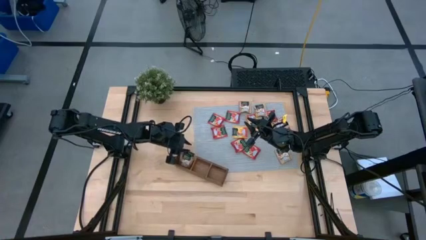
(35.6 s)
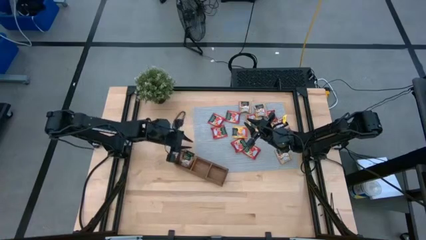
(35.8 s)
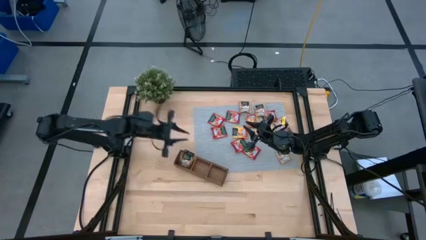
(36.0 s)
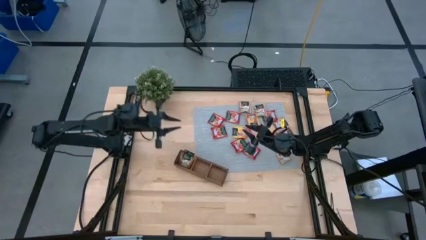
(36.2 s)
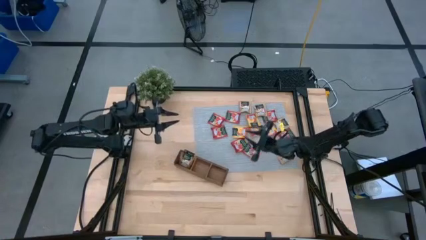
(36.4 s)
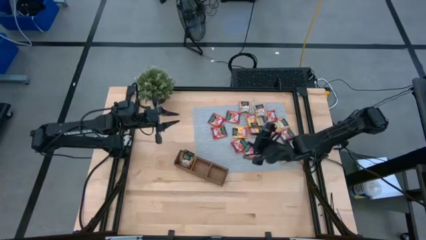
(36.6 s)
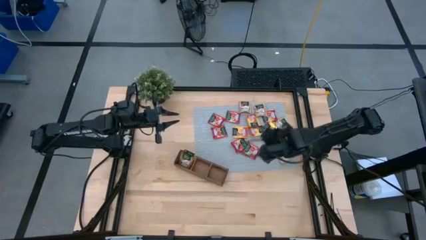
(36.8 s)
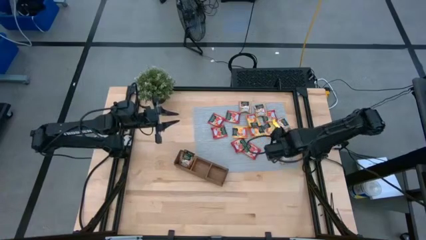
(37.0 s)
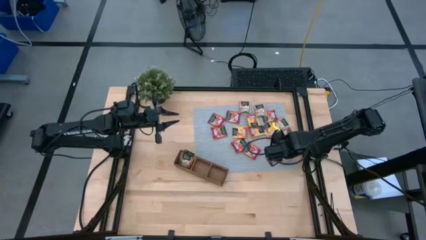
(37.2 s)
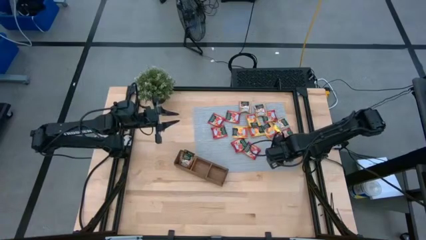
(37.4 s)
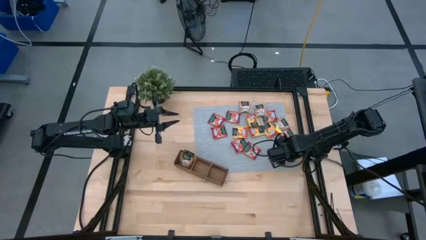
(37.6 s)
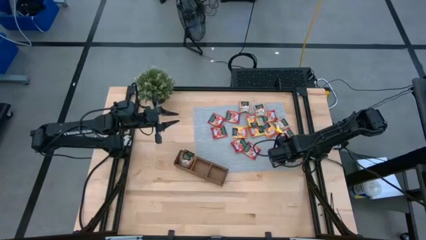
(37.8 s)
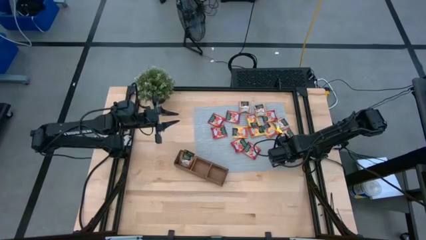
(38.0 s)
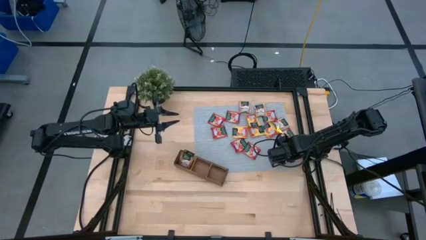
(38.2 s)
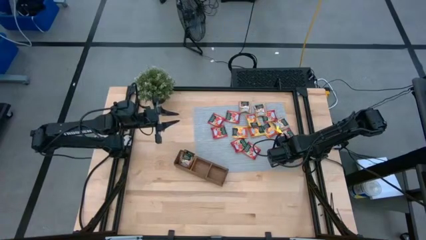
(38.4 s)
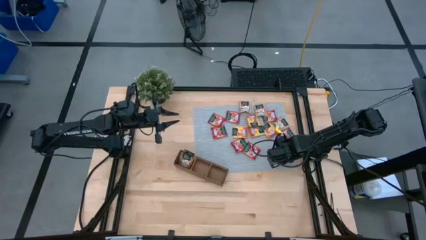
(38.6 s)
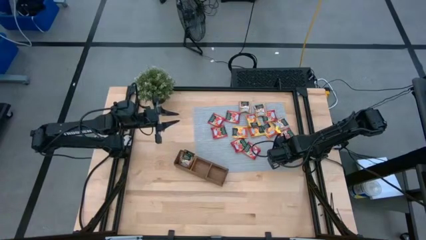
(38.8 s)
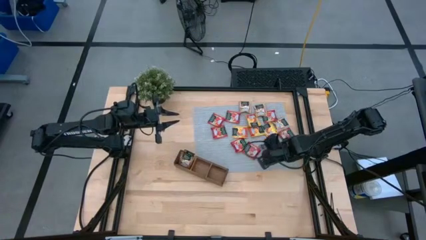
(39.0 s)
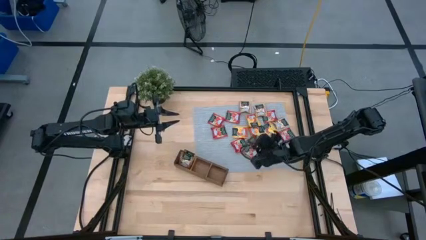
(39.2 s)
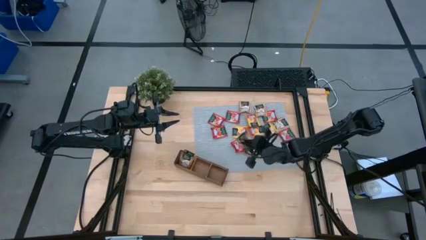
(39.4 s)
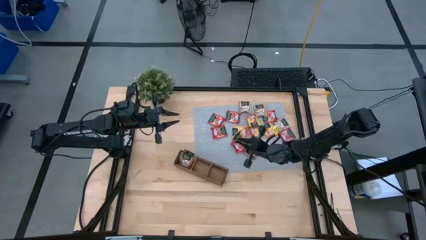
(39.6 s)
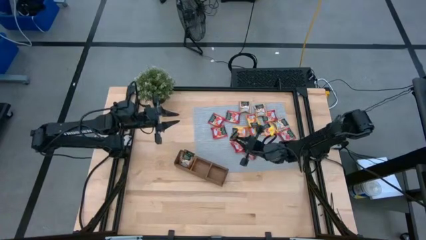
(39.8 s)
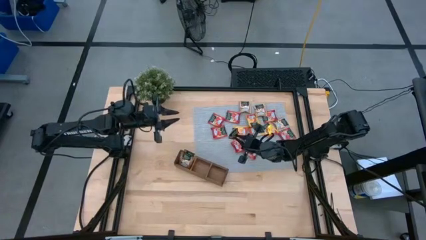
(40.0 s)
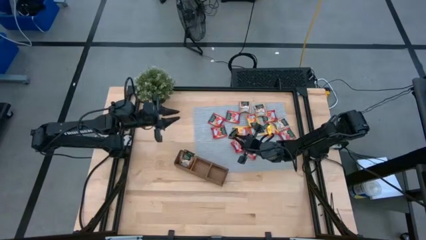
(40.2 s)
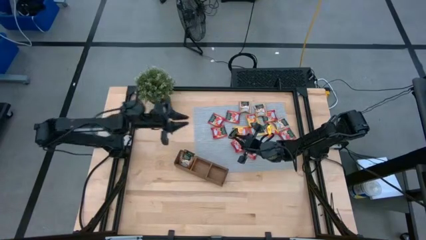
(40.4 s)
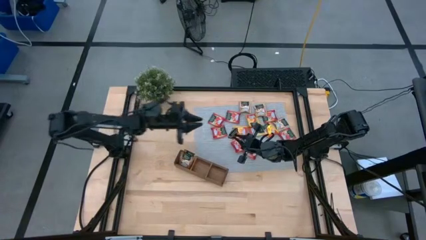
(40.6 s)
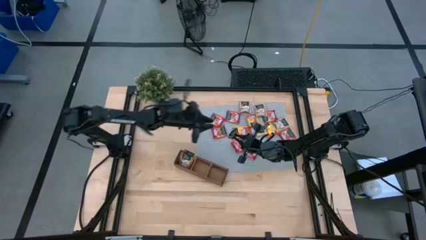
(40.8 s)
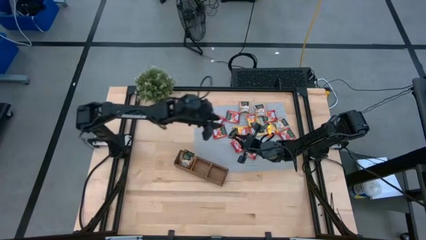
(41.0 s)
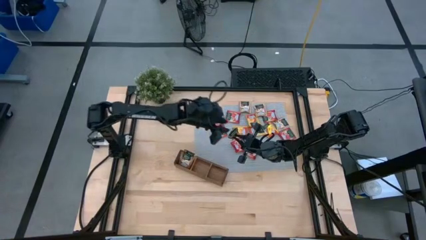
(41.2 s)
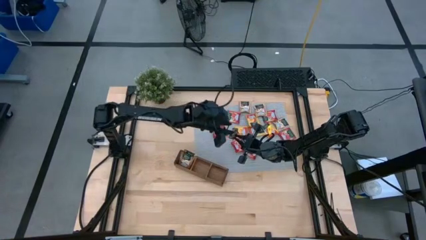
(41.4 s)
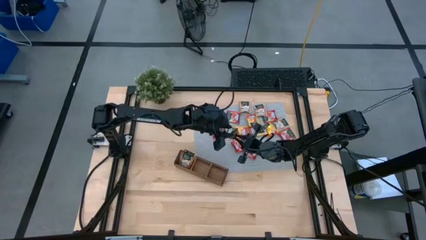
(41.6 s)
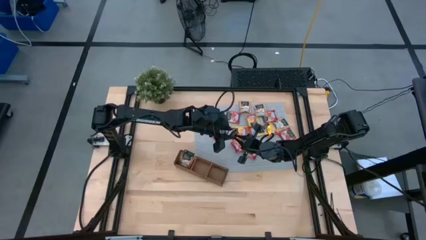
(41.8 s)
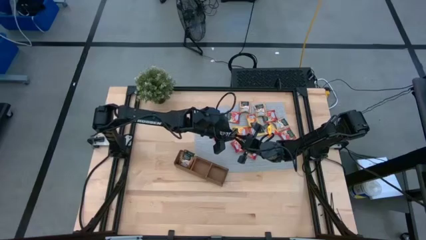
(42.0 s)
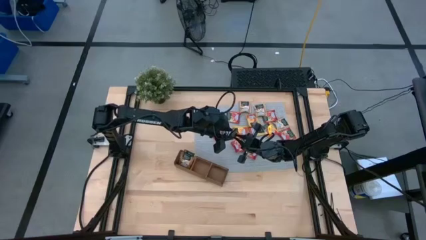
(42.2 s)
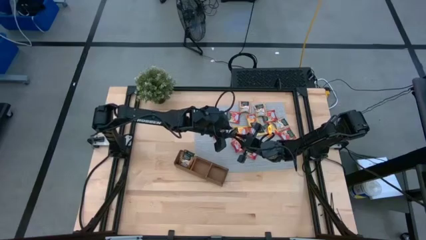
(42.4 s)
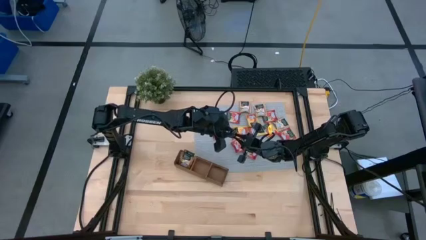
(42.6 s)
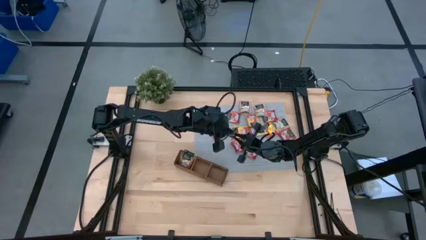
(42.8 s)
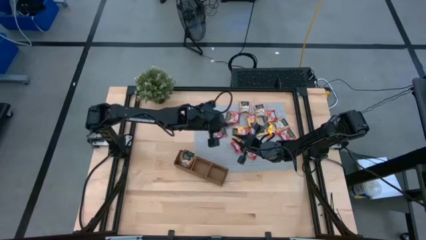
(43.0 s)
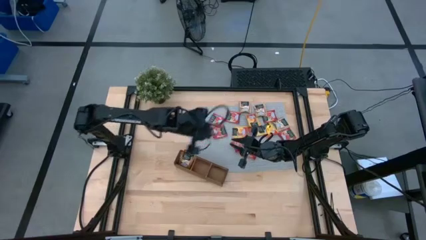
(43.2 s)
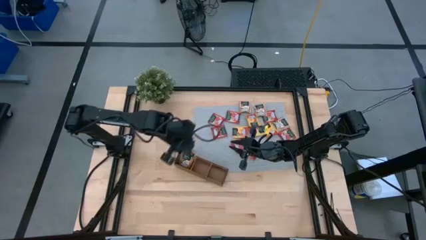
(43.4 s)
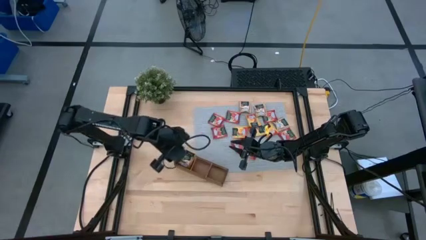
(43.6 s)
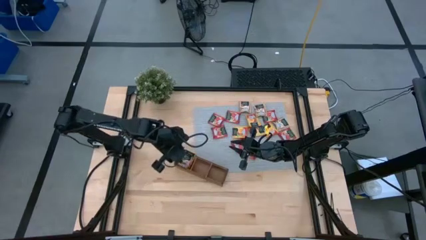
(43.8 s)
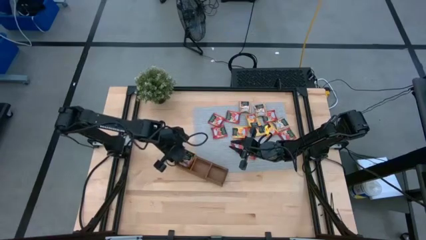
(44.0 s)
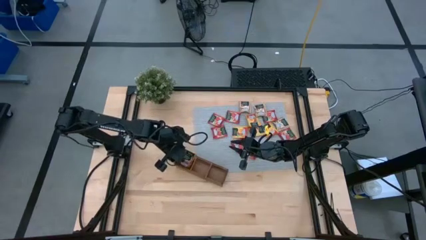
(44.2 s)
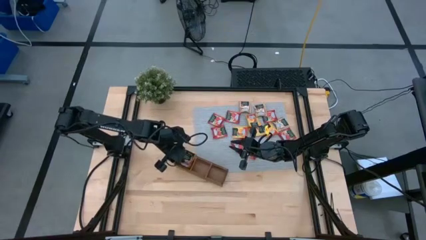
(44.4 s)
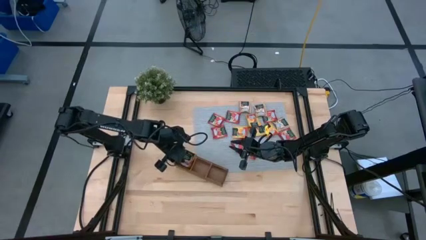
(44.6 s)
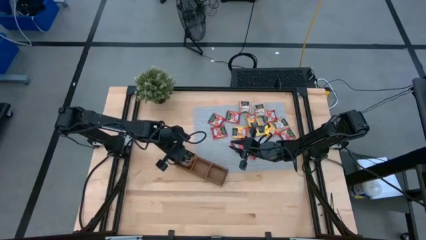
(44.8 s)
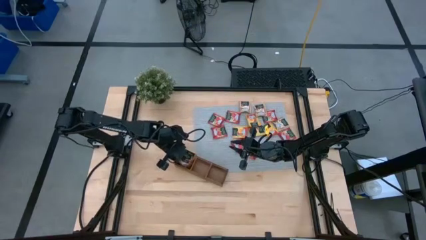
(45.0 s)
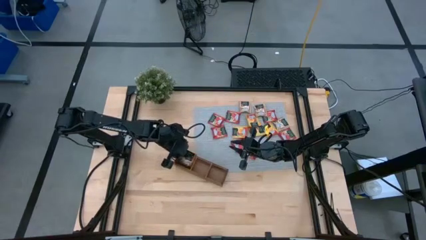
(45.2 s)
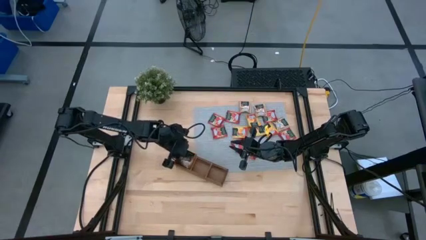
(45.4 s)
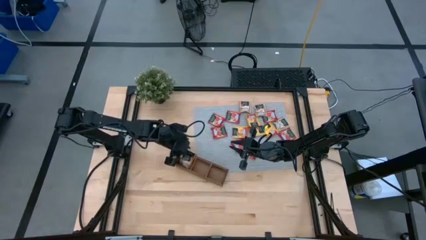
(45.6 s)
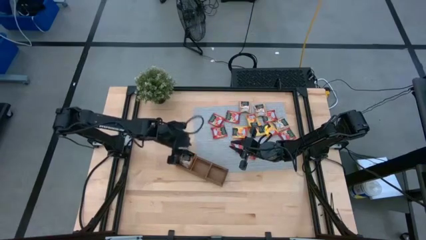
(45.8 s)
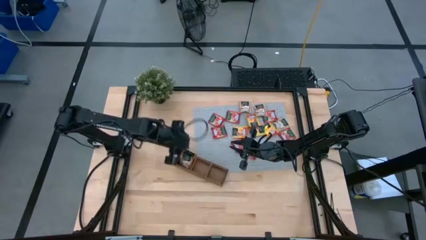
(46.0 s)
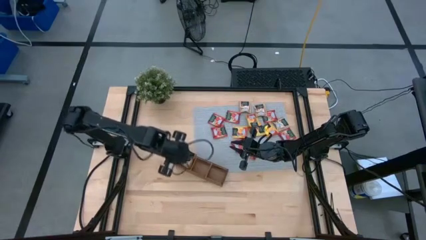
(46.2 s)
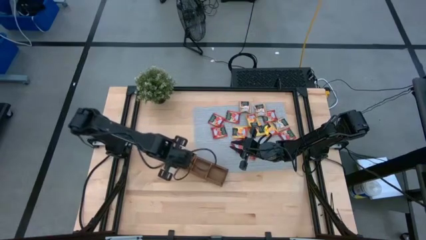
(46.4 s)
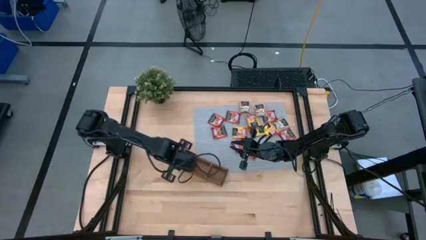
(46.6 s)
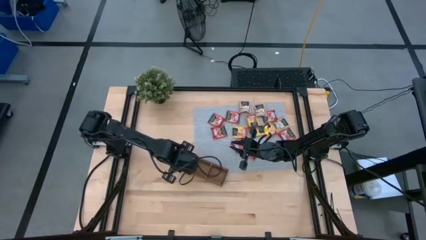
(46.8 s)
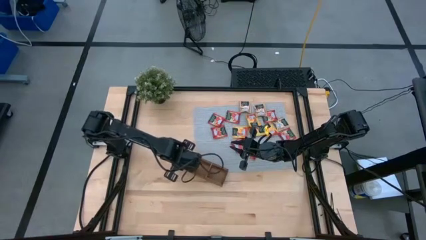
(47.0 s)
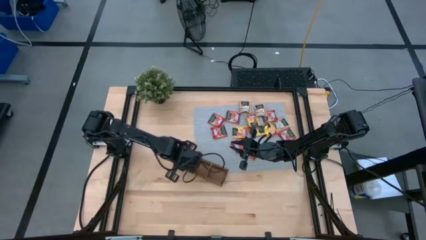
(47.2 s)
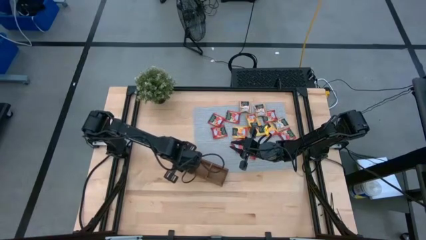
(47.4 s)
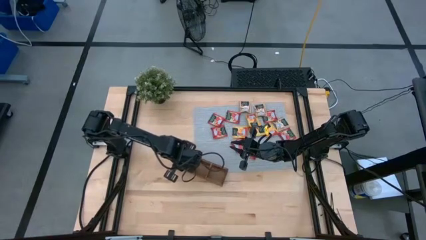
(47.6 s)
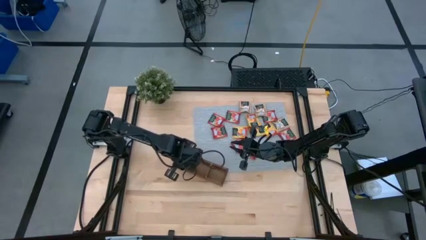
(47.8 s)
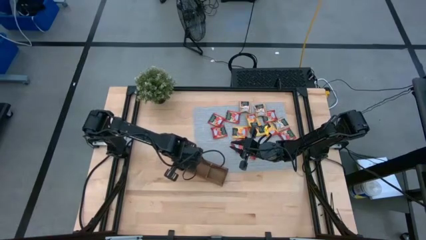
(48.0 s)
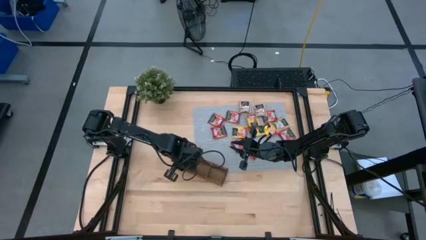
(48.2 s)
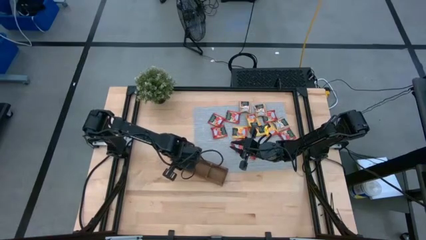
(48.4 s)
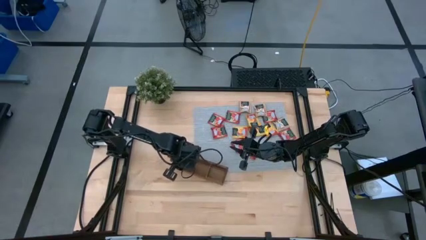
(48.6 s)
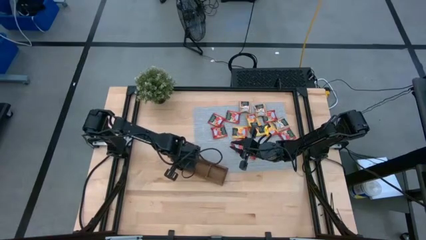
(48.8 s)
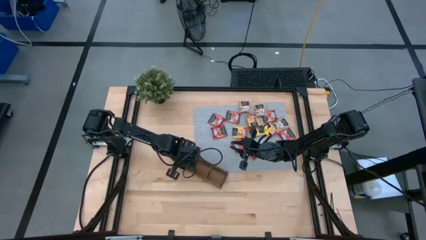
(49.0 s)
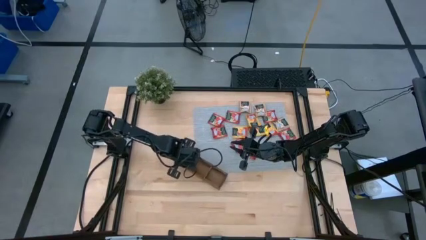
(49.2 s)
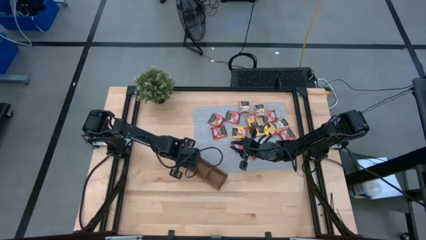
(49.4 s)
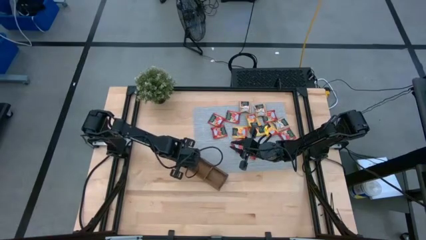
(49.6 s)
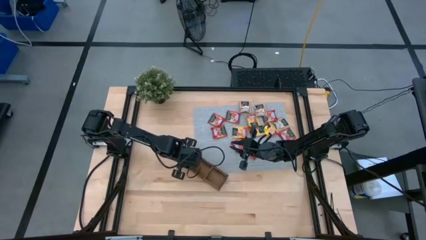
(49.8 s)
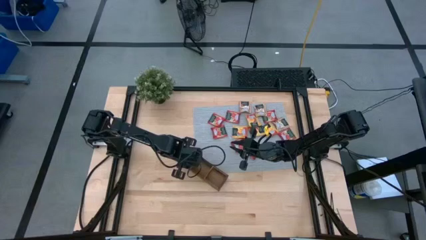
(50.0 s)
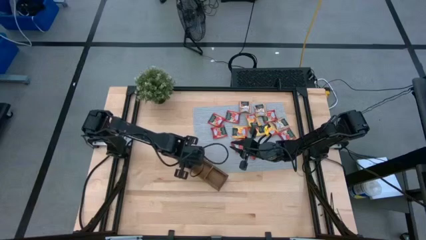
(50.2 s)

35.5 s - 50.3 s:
Task: Pick & Place Tea
Put the brown tea bag into the left section of the wooden organizer
